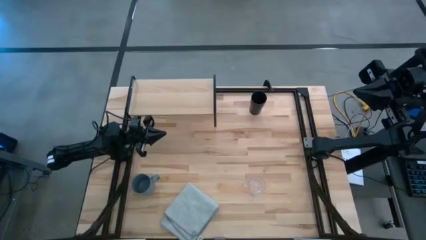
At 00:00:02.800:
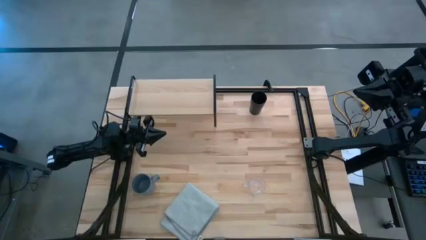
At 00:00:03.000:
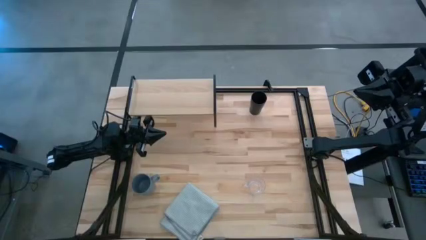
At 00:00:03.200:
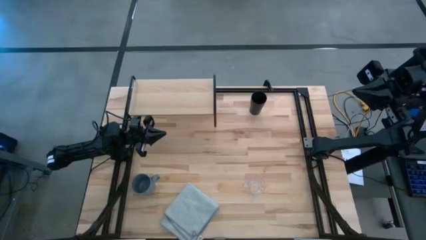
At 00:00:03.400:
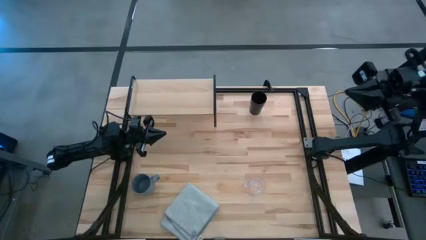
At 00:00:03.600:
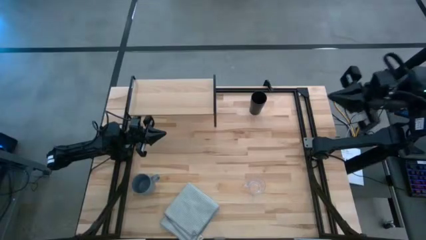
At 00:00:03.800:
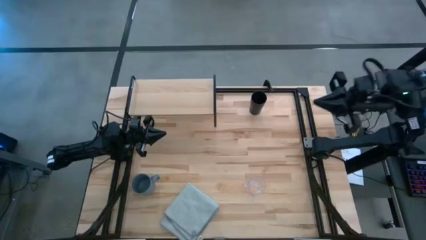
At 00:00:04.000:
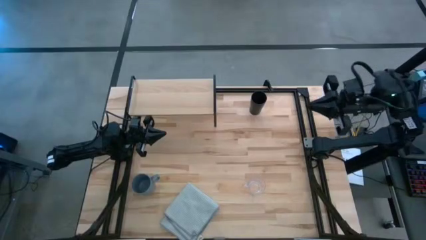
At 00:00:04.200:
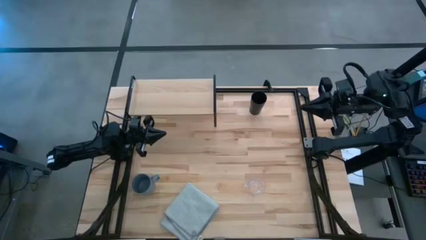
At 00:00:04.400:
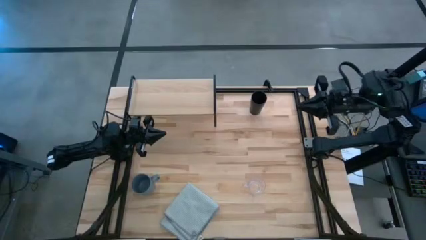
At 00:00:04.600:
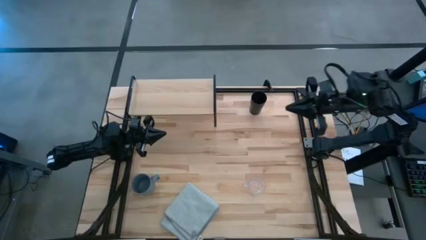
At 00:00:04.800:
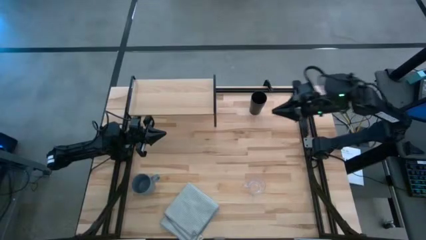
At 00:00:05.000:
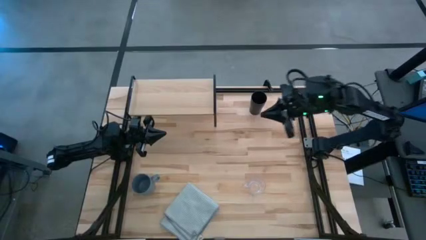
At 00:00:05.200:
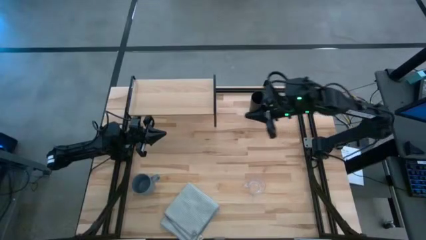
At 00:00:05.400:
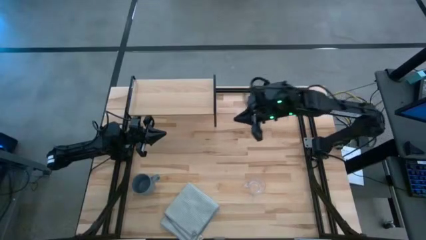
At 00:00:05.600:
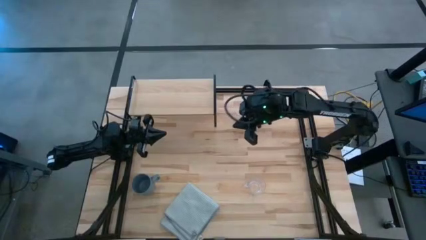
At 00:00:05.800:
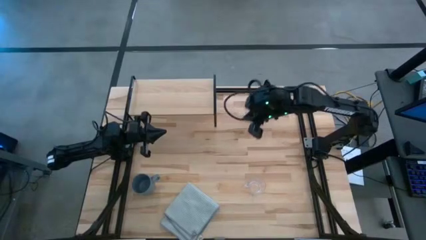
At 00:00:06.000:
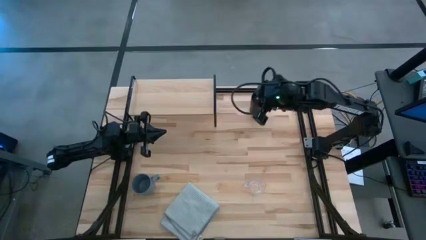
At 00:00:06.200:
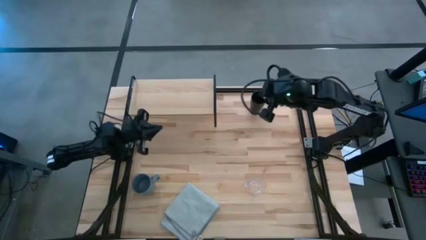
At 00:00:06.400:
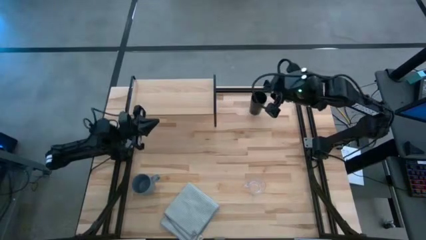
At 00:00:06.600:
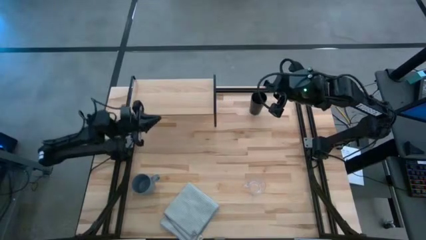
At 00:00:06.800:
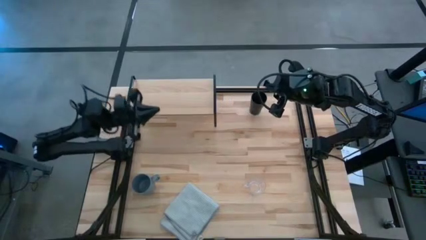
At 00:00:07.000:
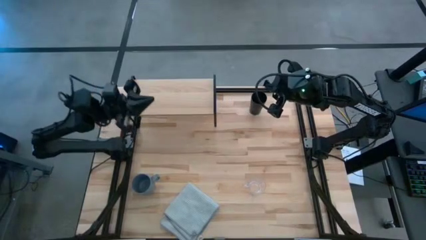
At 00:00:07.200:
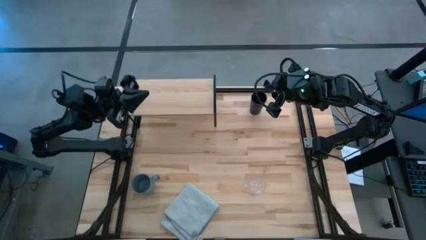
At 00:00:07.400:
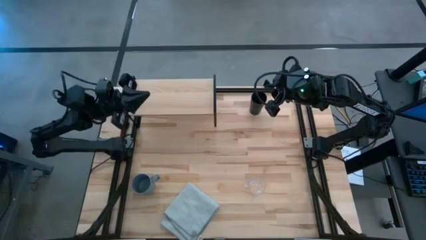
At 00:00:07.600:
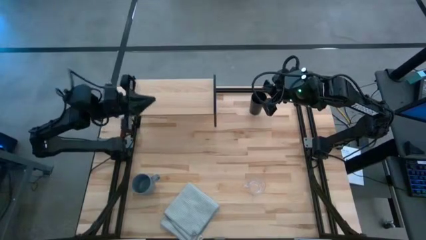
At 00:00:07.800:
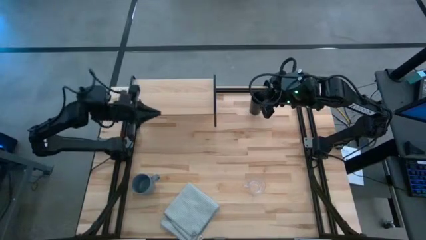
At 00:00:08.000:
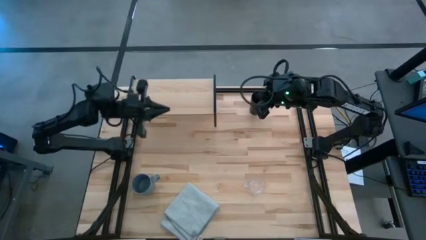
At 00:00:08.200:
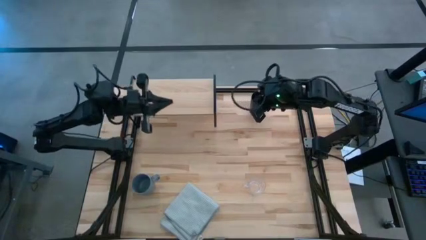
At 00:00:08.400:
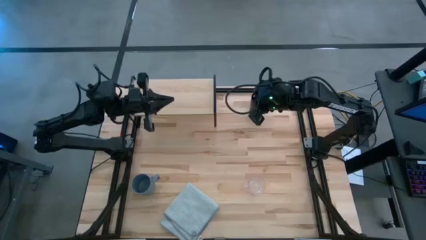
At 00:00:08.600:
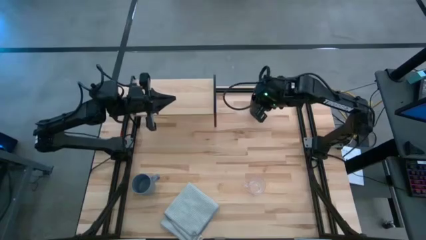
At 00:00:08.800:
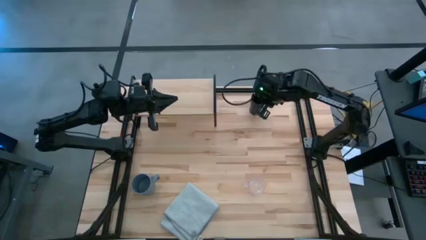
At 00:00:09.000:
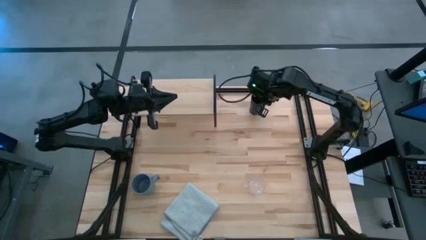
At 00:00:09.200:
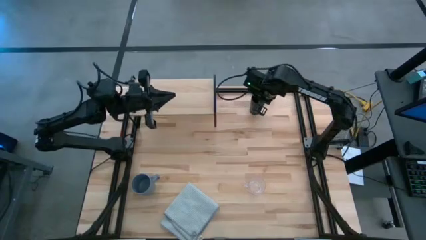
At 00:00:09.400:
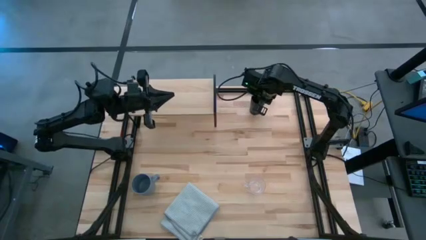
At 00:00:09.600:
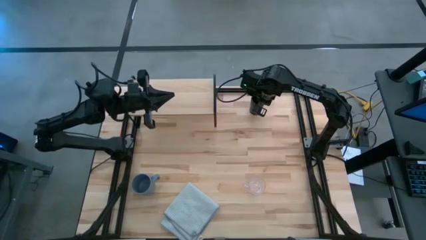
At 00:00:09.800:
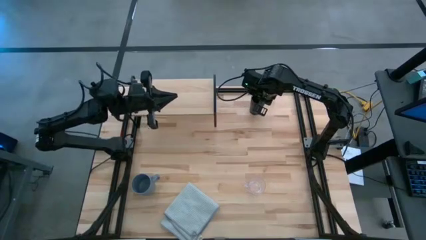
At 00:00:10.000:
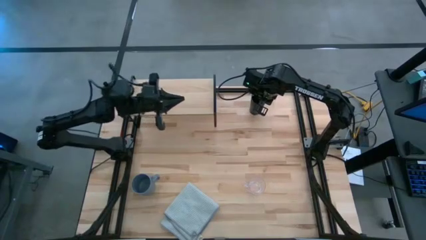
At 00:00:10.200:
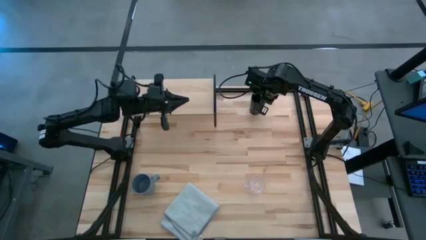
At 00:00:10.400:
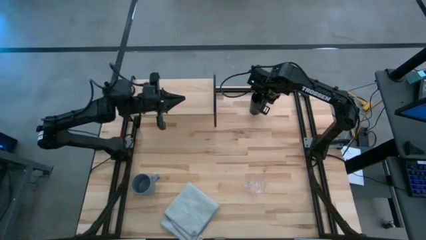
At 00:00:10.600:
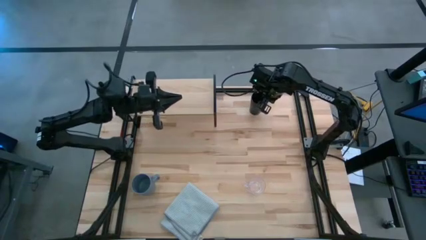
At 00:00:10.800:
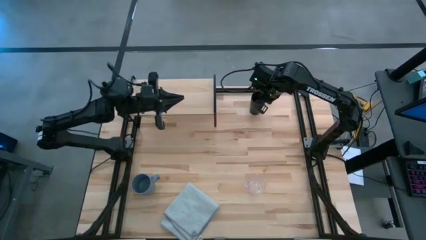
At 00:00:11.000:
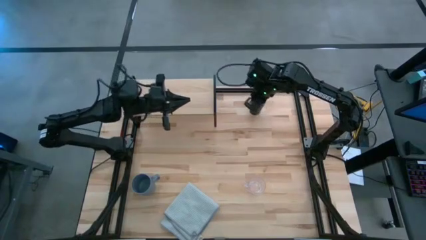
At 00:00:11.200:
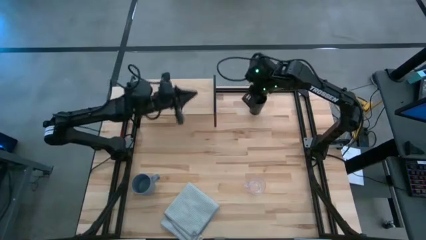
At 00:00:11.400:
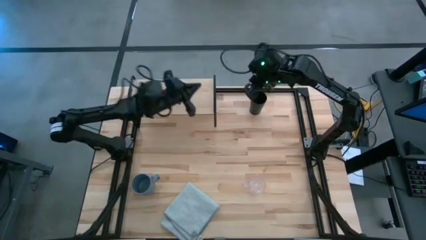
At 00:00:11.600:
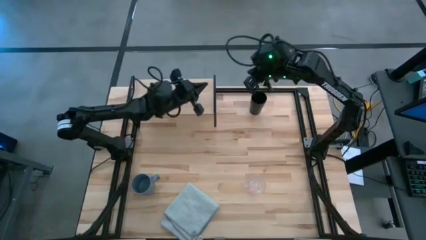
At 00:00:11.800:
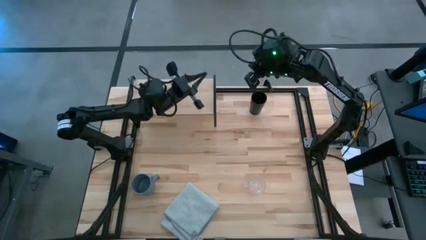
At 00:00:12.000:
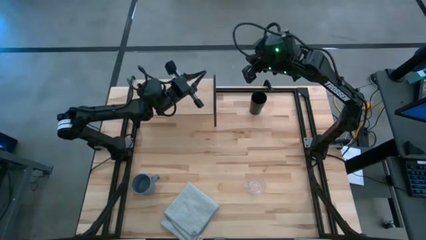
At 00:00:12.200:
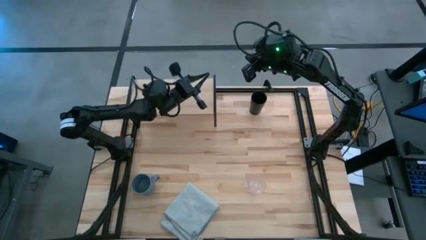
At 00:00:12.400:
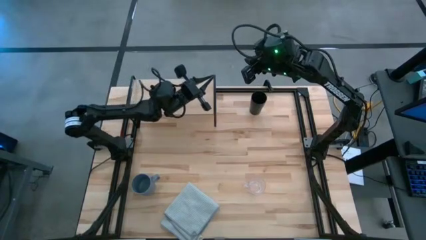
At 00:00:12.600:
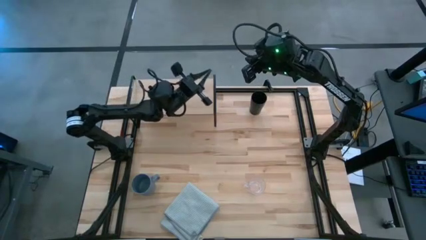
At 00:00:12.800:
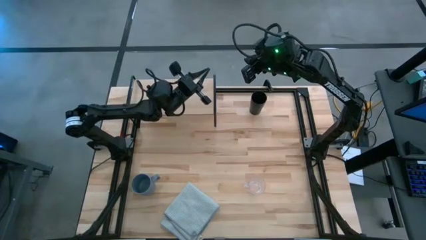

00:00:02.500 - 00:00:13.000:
Task: Stack small to large cups/mugs on shelf
Put the black cup on the shelf
